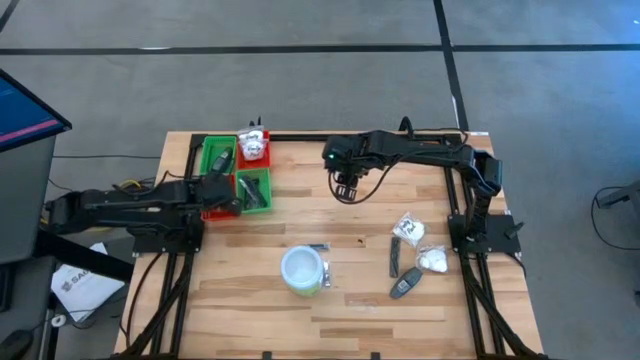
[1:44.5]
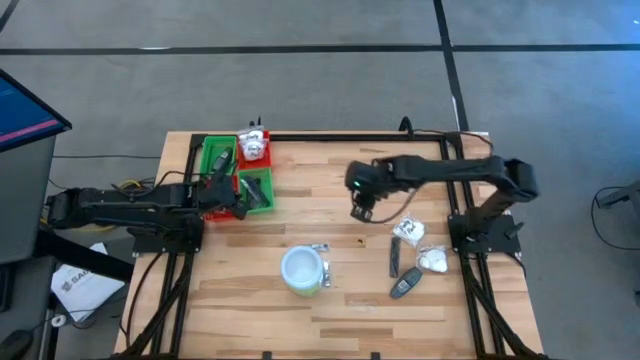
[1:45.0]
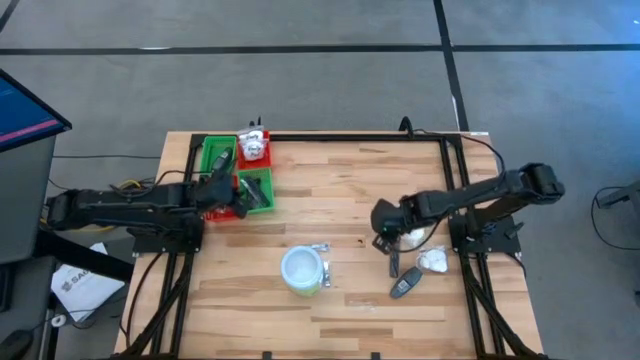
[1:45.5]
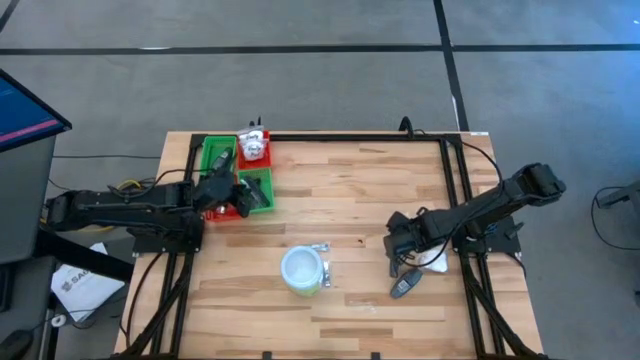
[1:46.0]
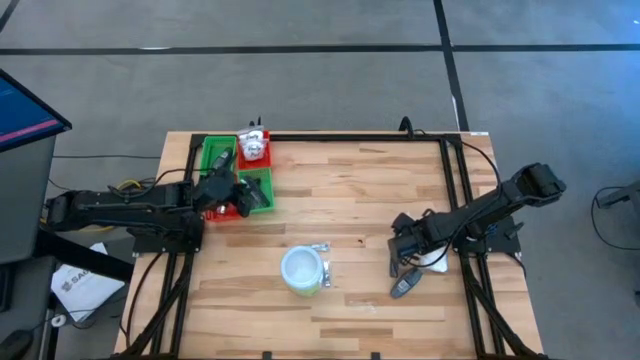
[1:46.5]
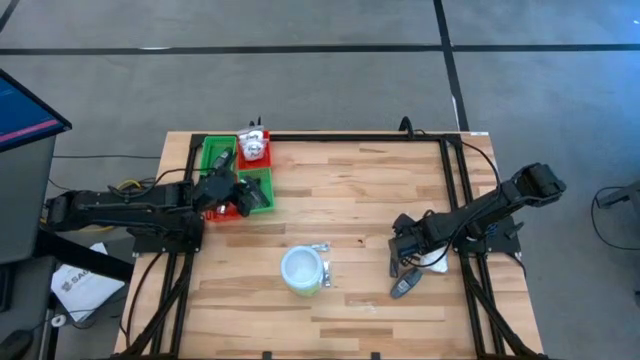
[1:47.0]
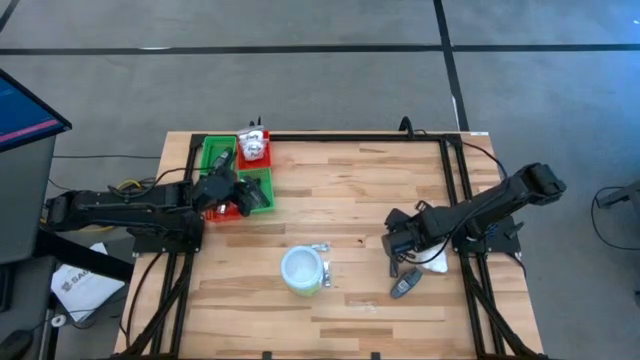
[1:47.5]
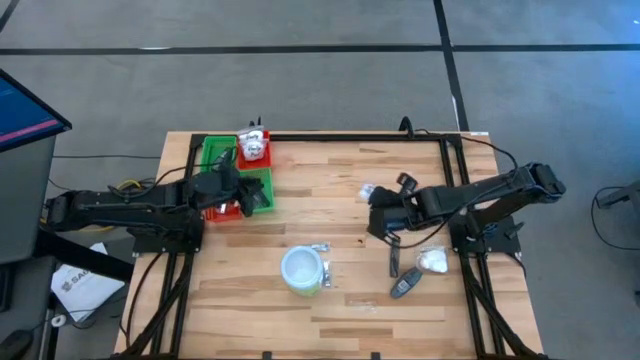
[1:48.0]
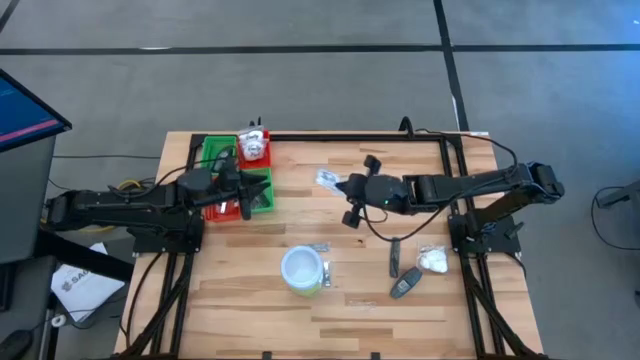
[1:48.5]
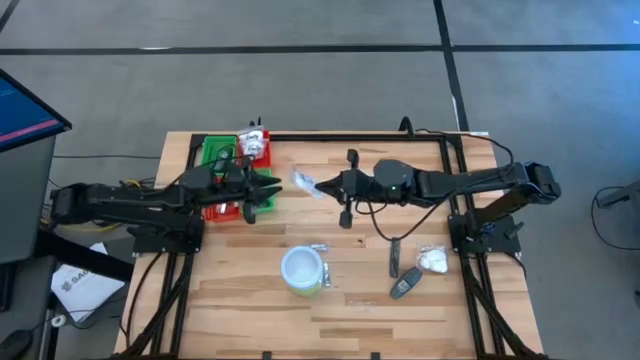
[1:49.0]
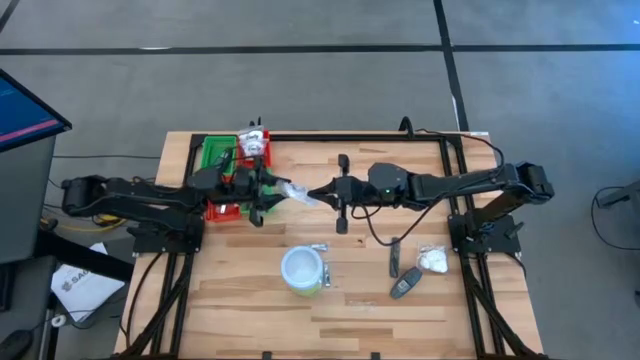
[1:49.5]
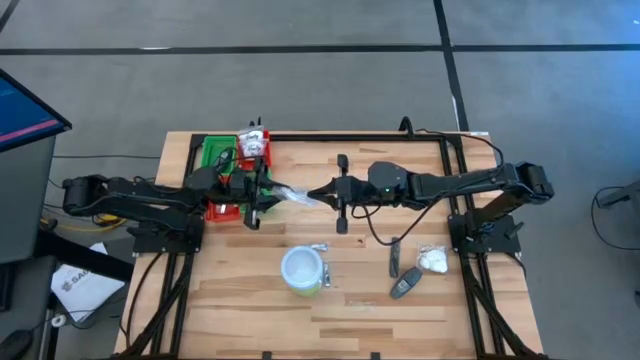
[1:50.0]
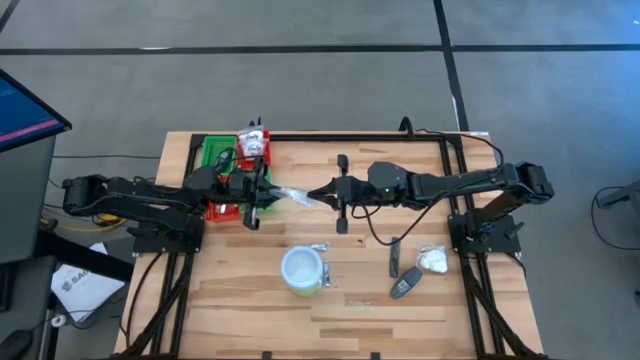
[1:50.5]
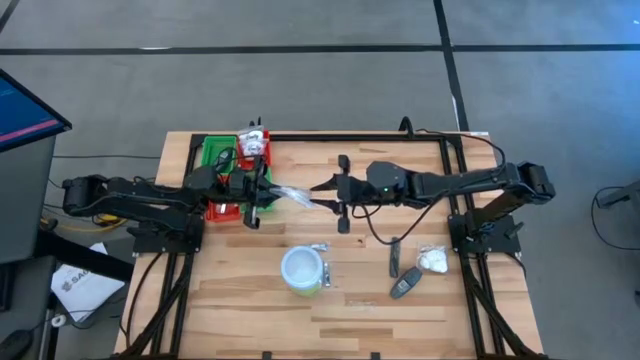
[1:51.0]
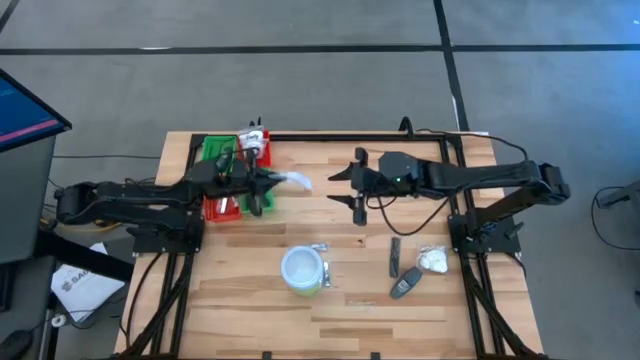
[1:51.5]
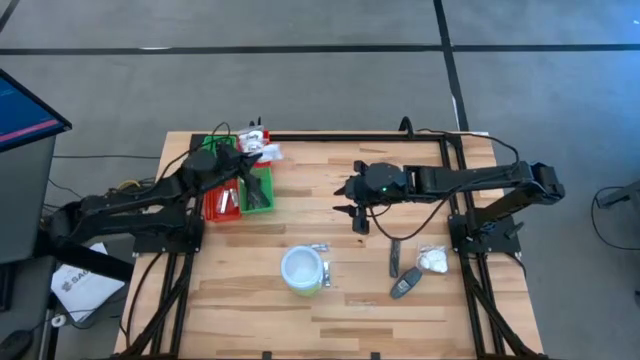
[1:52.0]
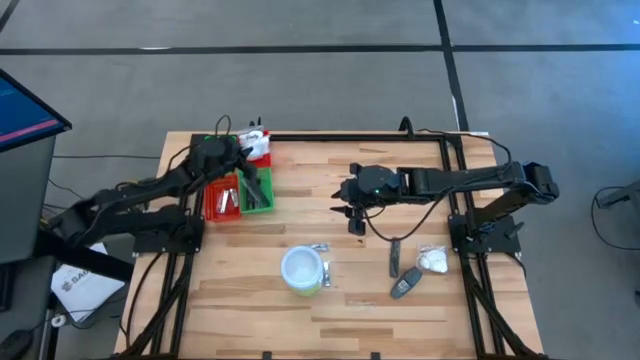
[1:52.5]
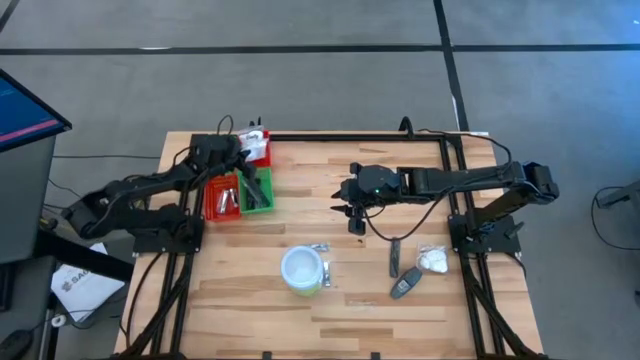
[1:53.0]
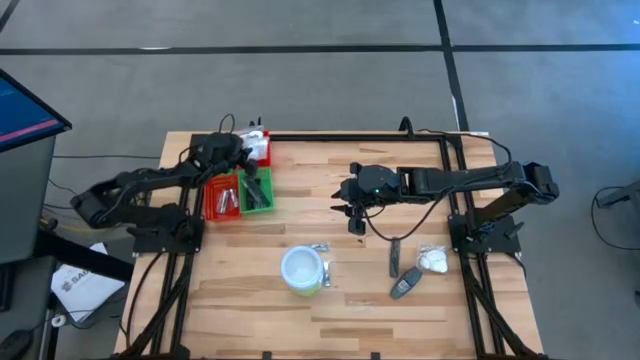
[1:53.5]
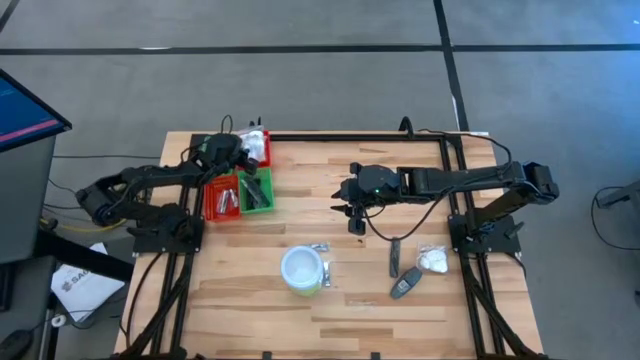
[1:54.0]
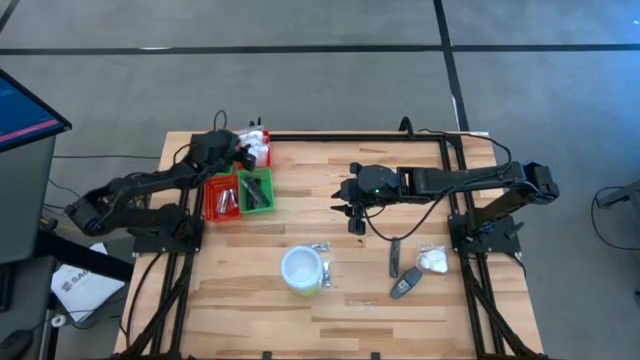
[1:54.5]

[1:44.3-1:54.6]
Task: Pick & Place Travel size toiletries
Put the white cotton pack into the top red bin

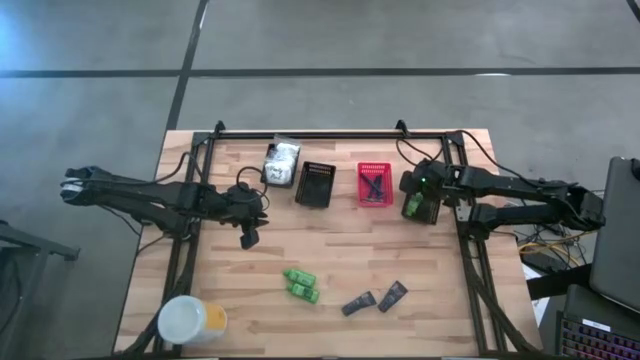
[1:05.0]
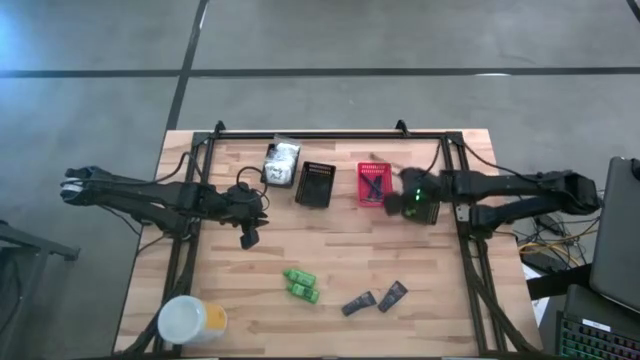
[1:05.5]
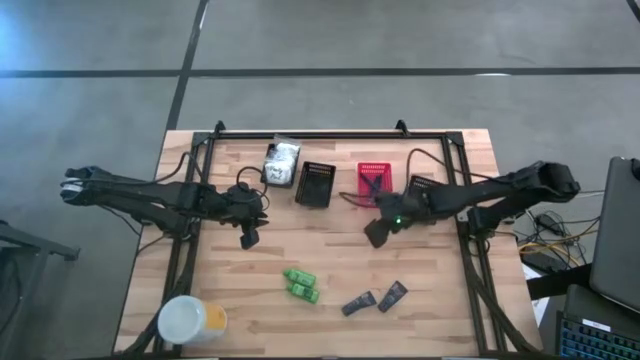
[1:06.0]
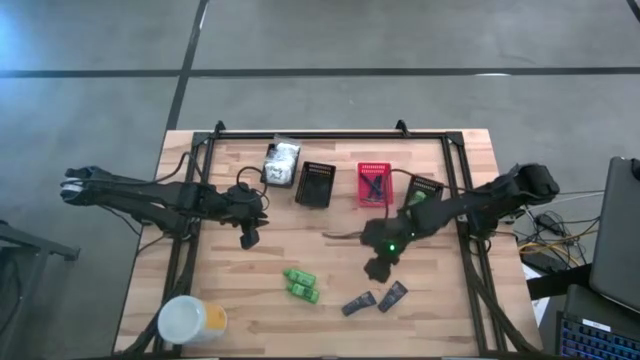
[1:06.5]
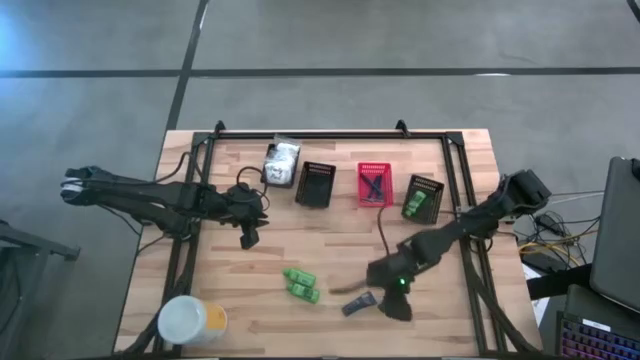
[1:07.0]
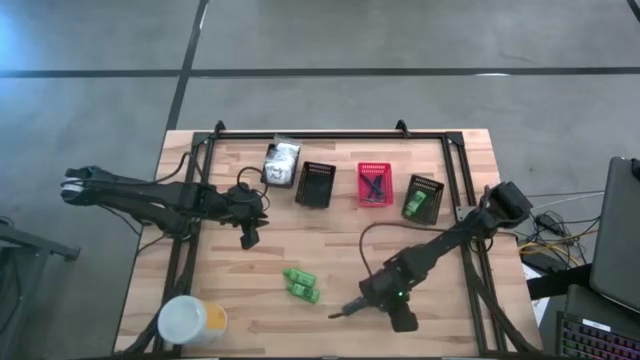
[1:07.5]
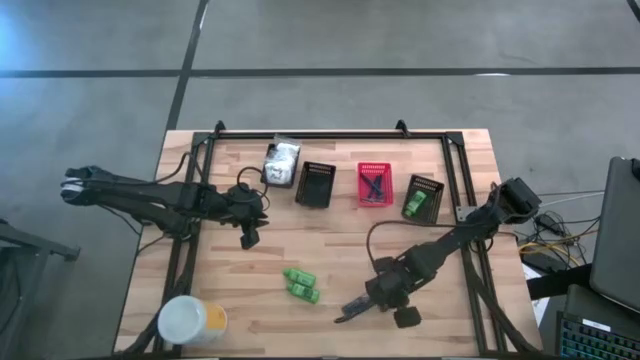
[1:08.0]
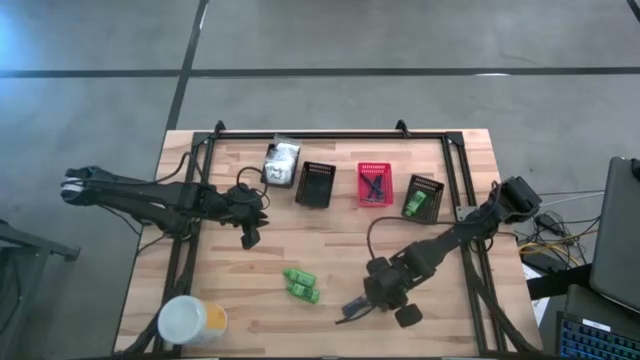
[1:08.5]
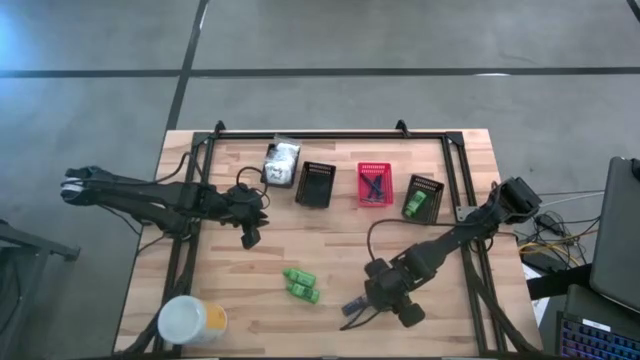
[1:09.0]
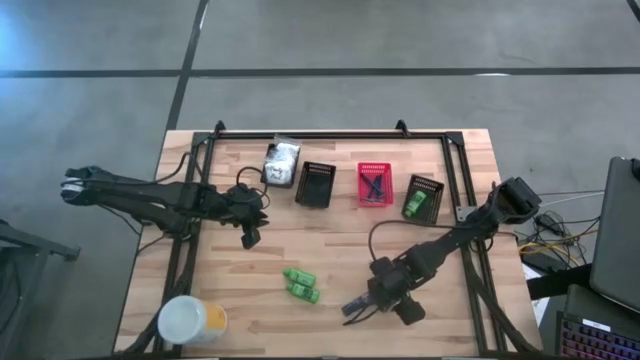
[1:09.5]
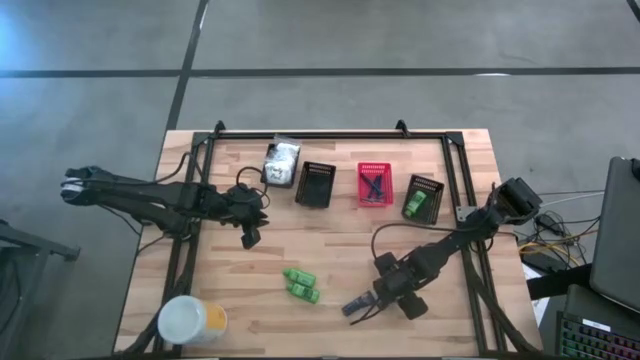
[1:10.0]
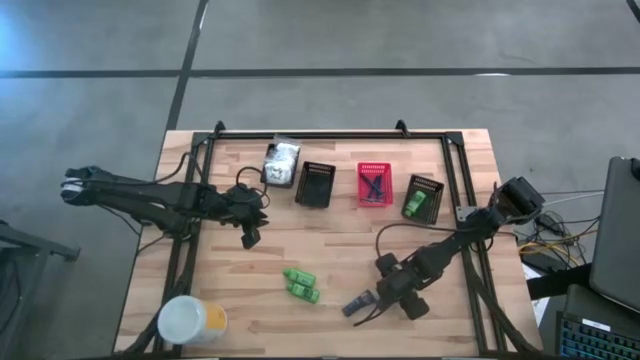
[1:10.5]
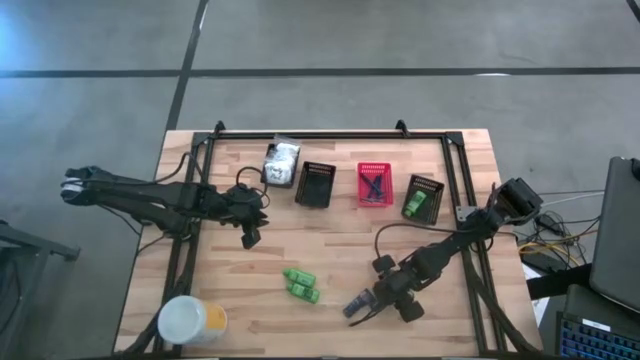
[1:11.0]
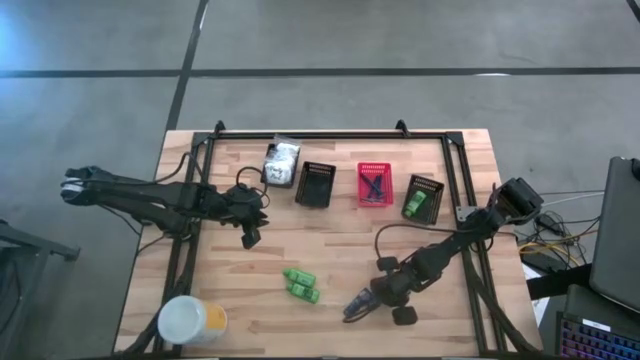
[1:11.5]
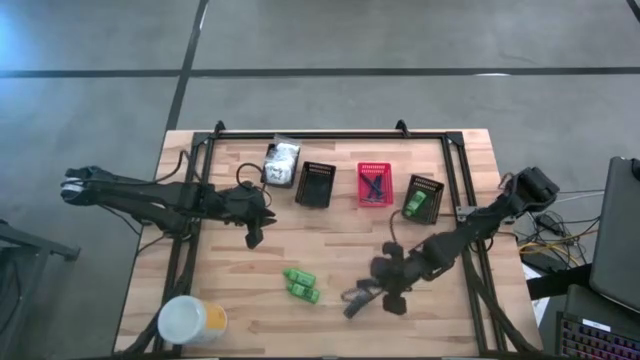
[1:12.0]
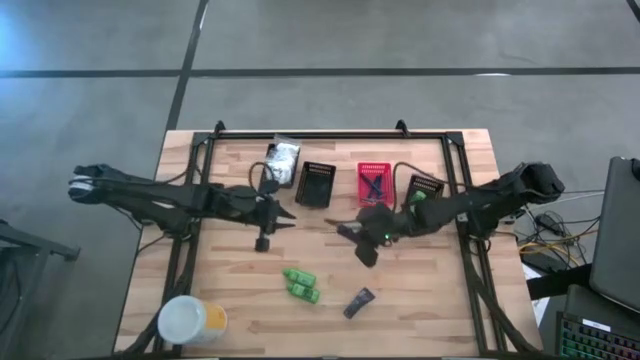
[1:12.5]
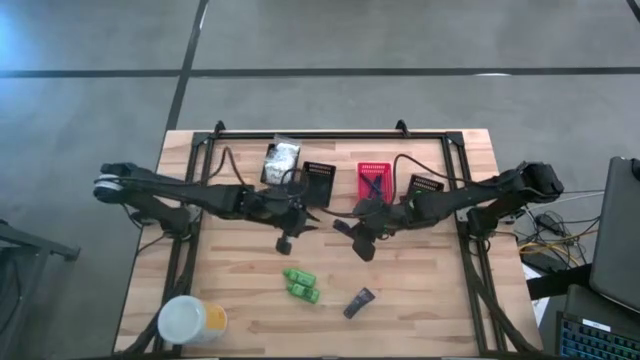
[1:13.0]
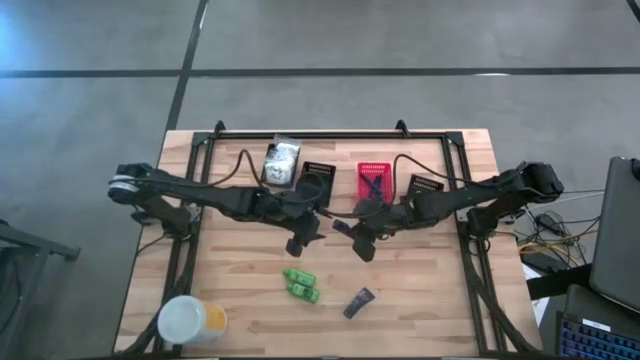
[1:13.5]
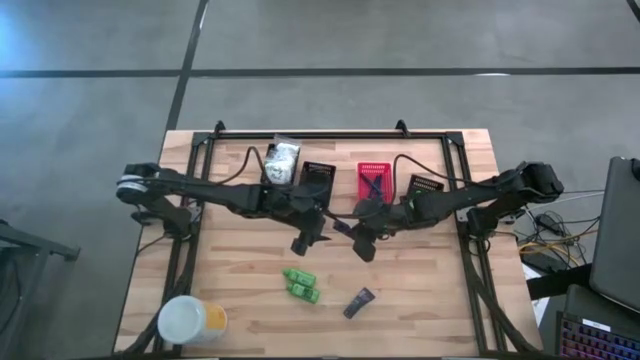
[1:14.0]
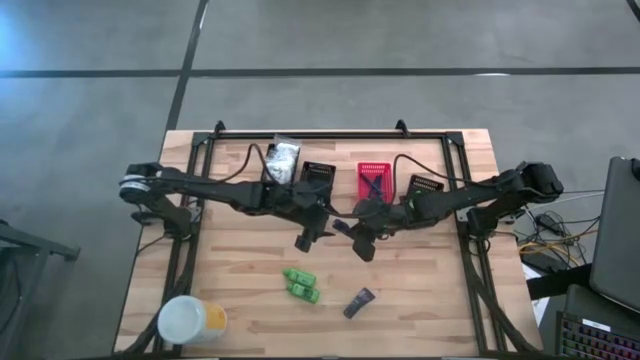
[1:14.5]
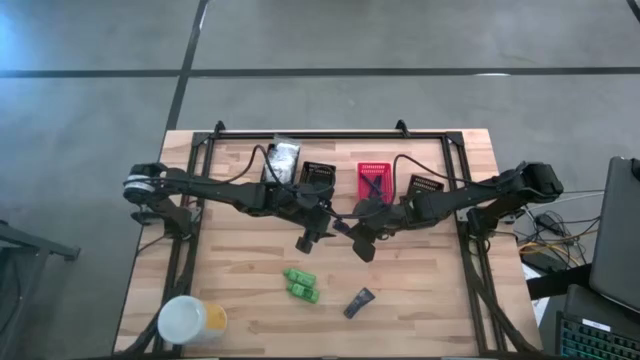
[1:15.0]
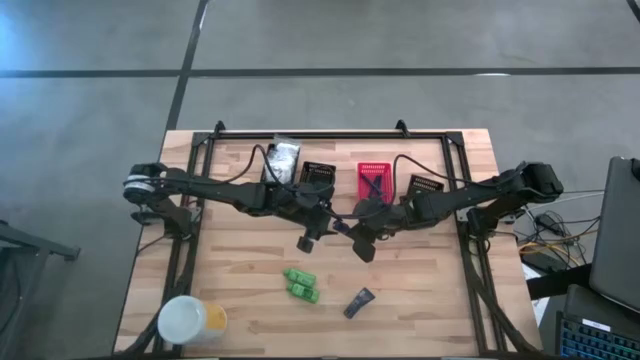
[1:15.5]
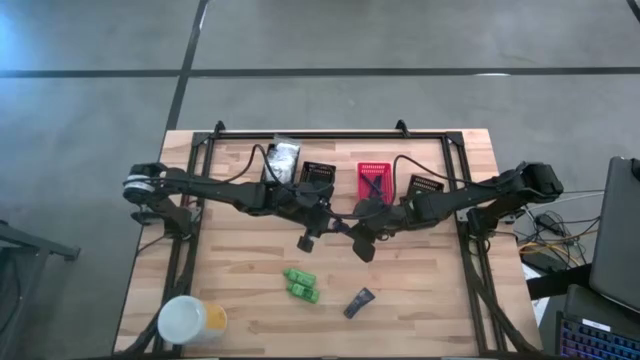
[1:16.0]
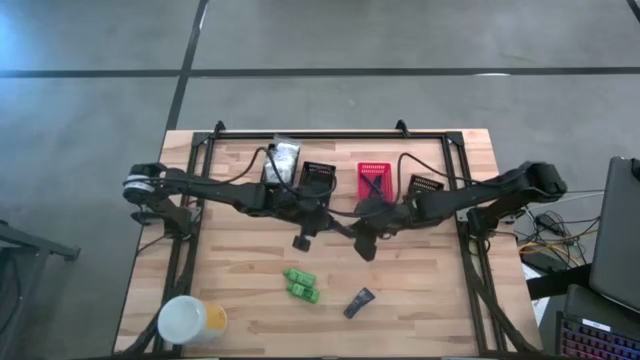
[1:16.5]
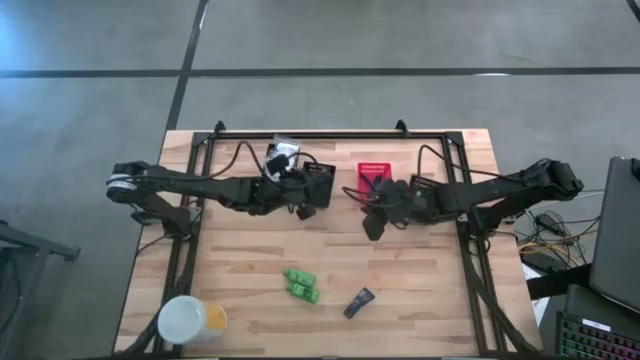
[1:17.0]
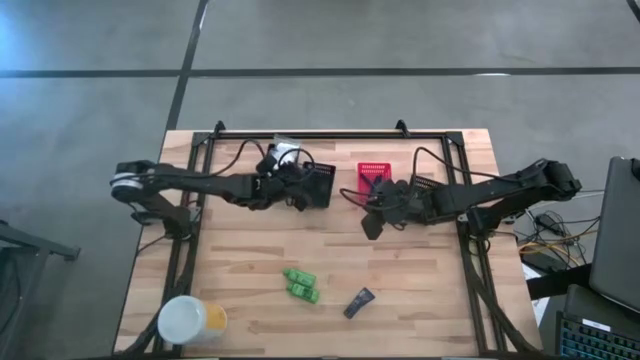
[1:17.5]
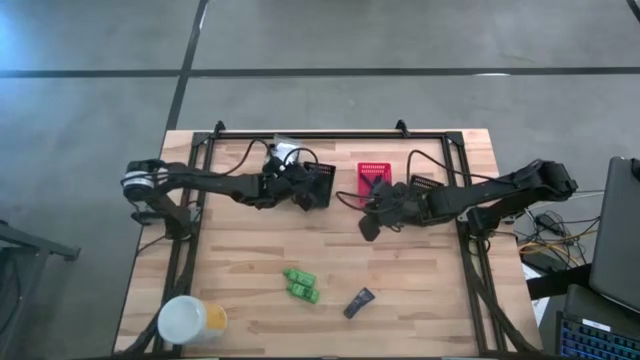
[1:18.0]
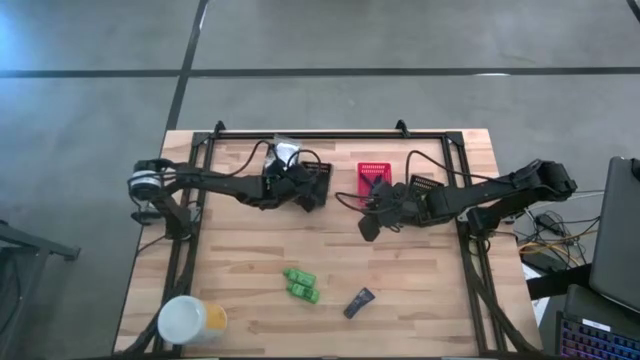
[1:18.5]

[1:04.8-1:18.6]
Task: Pick & Place Travel size toiletries
Put the blue shave cream into the middle black bin
